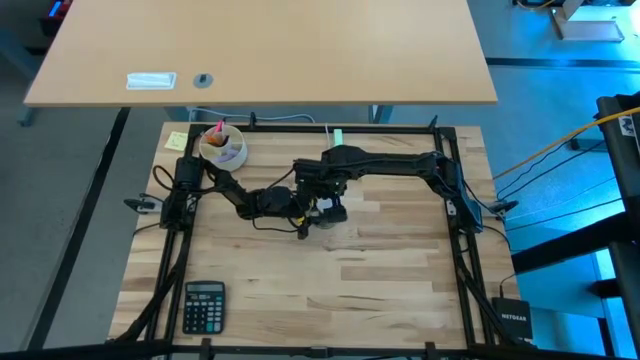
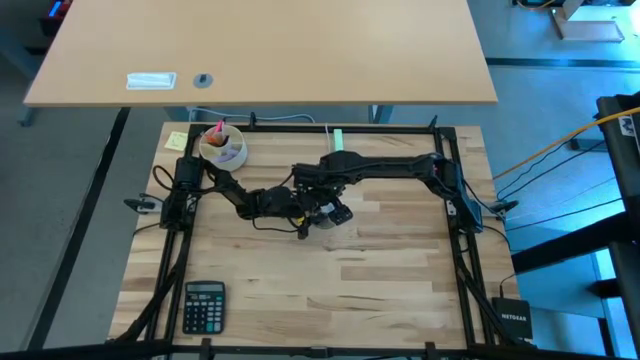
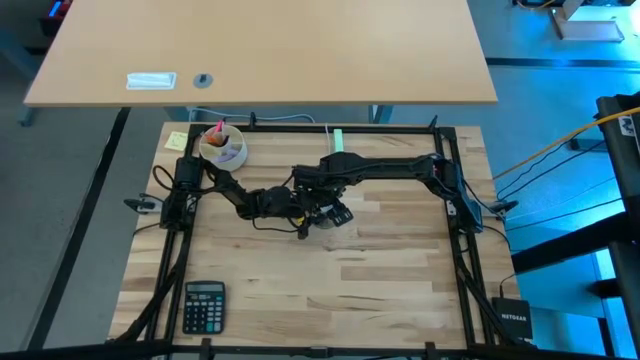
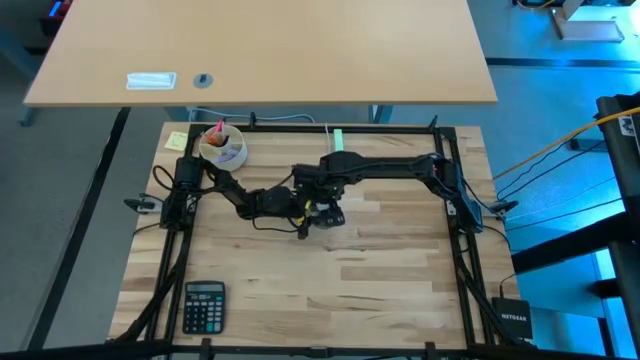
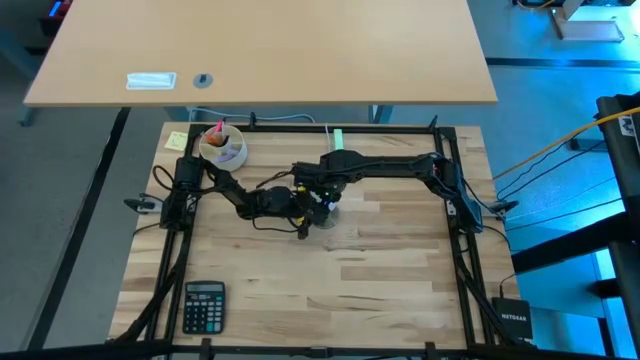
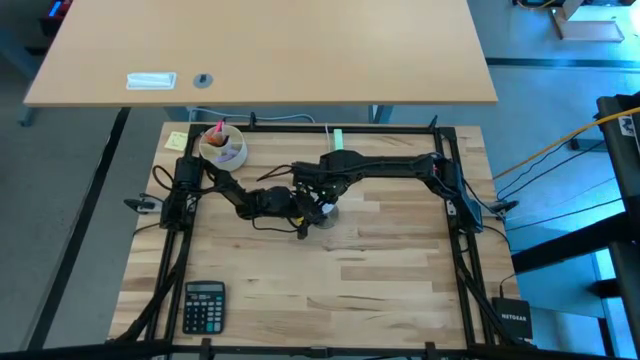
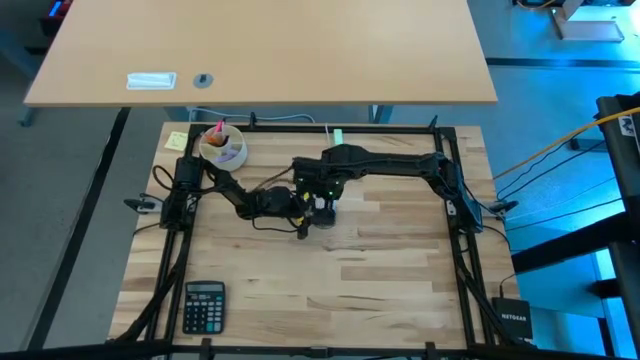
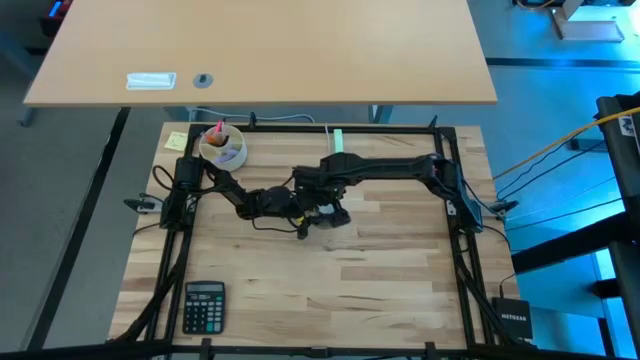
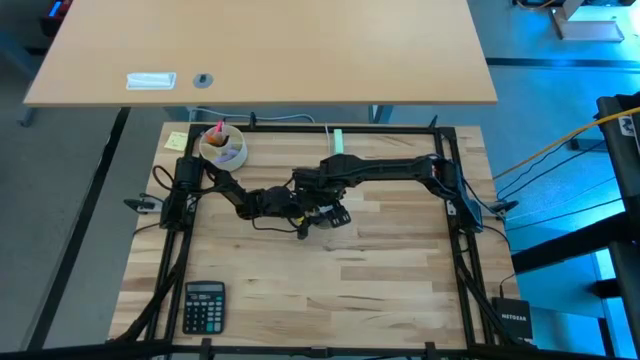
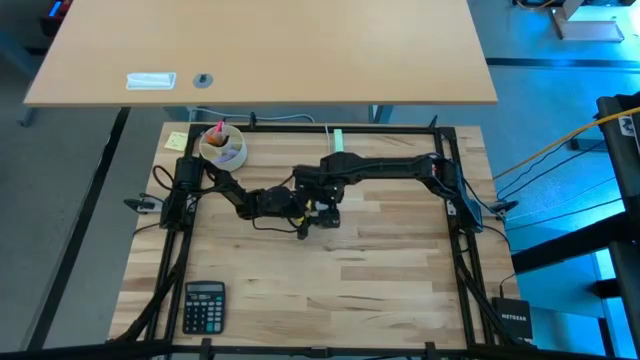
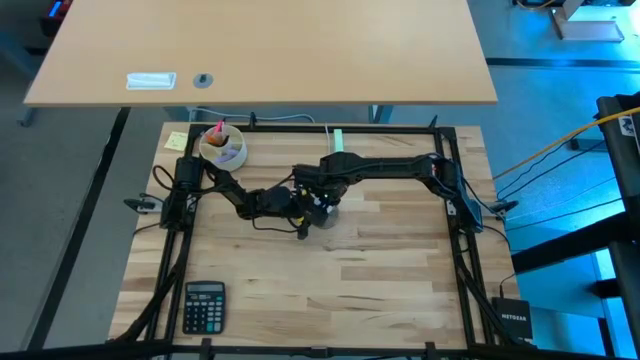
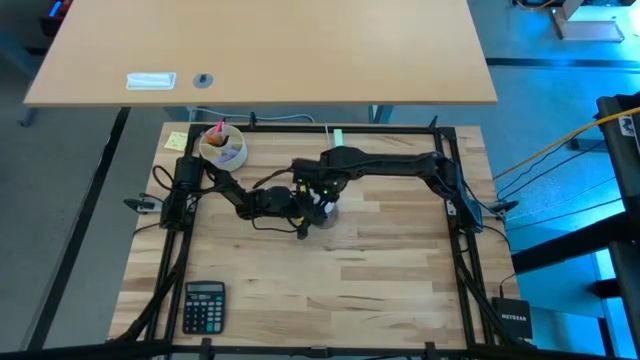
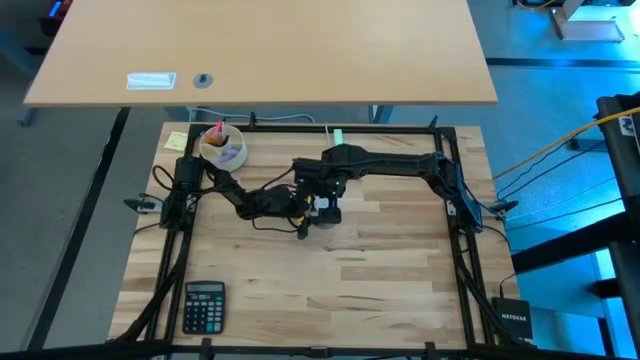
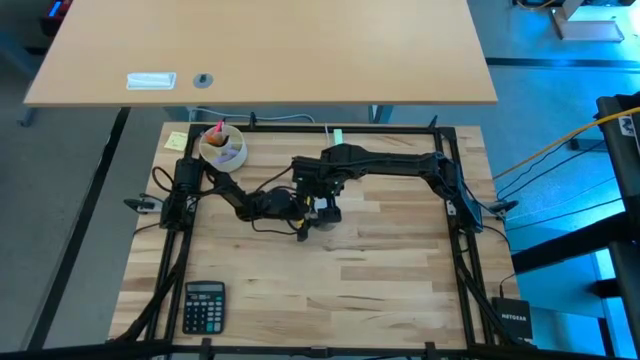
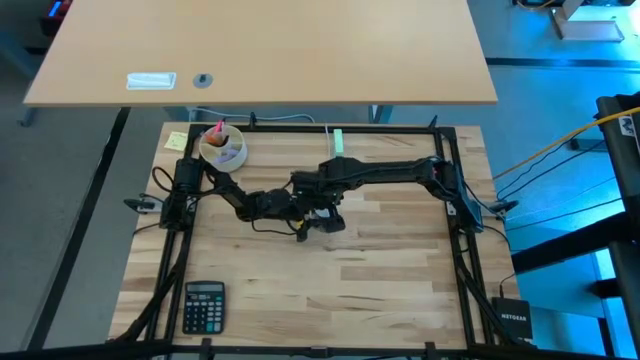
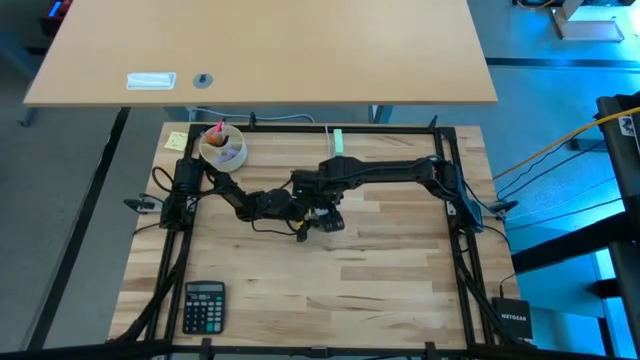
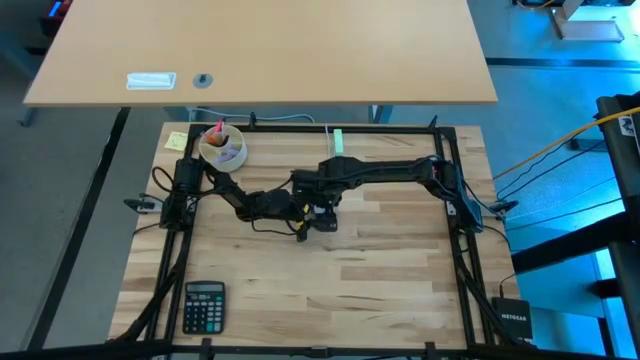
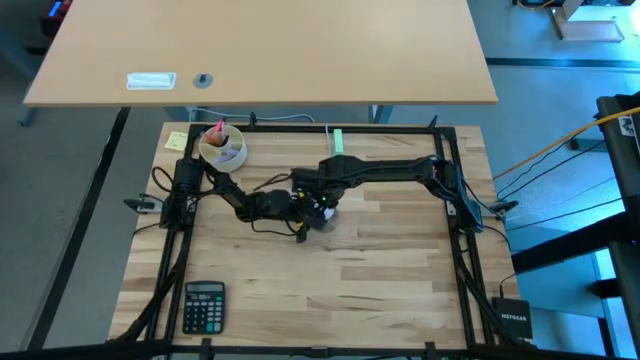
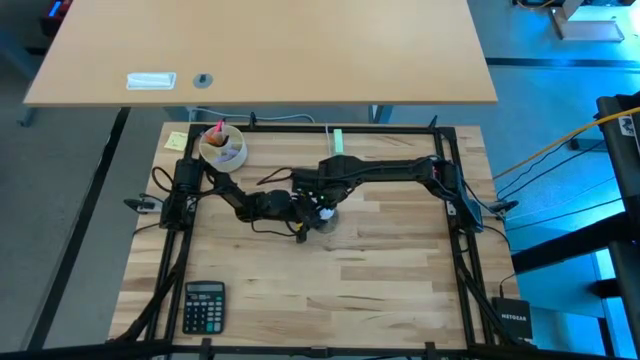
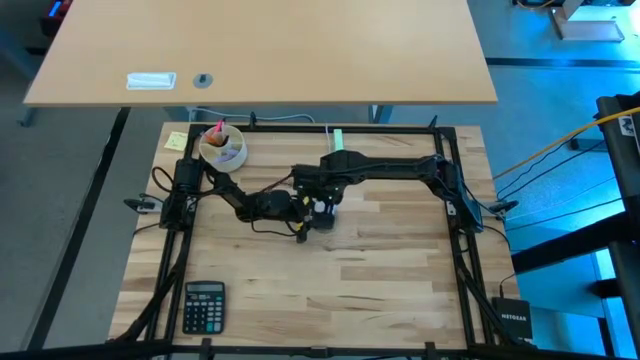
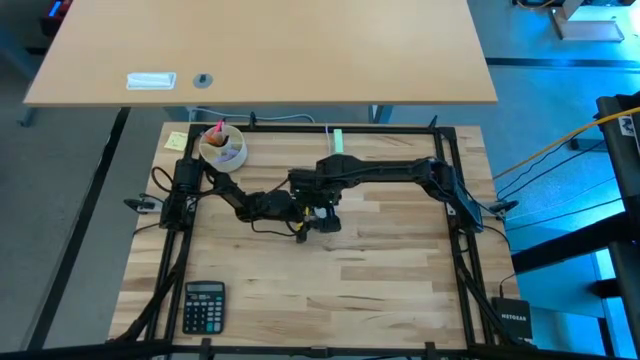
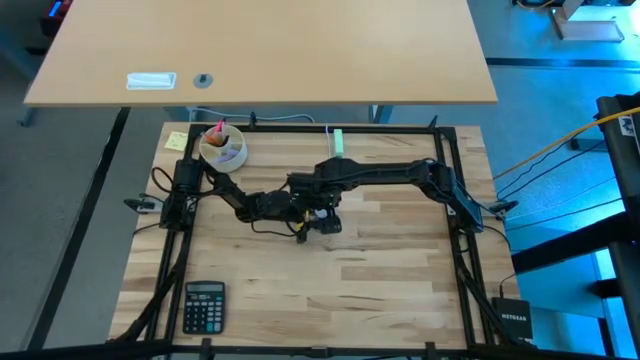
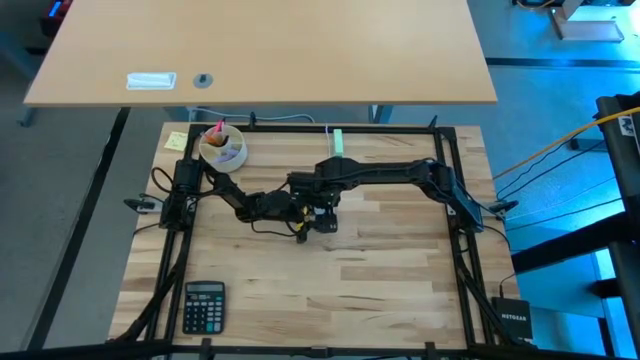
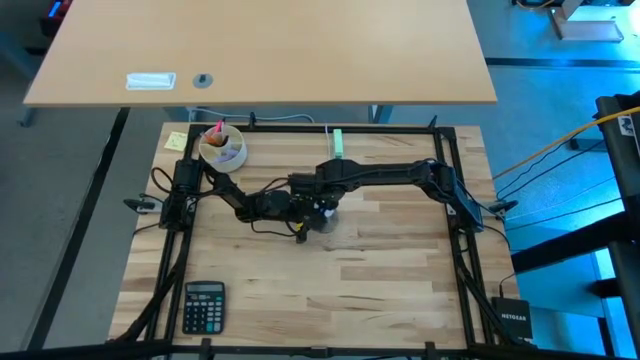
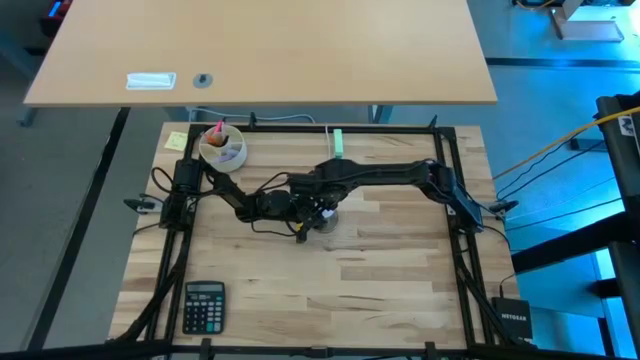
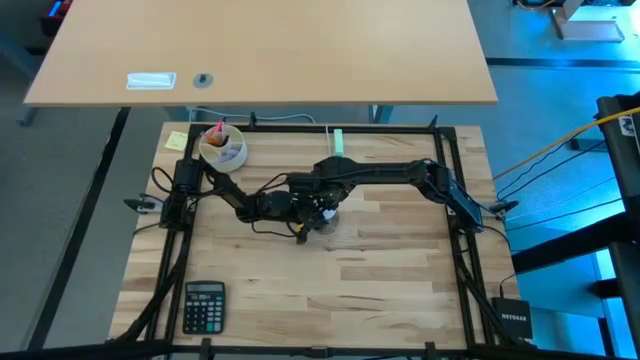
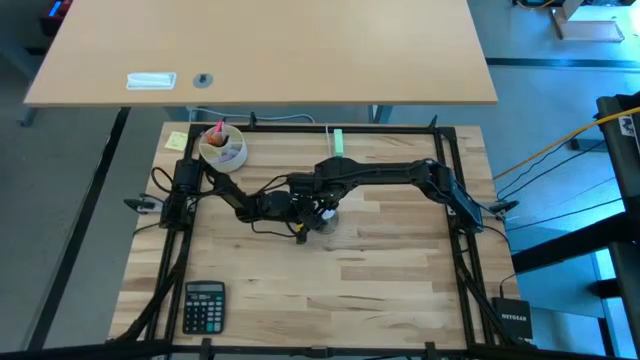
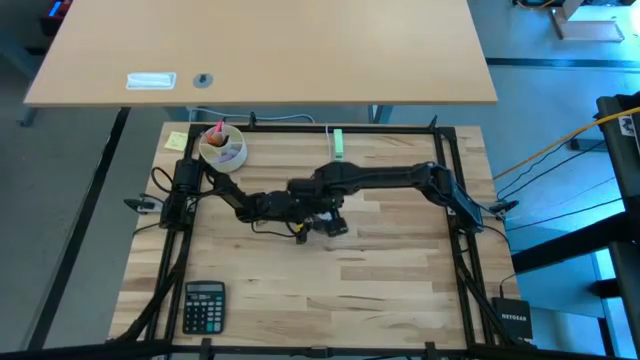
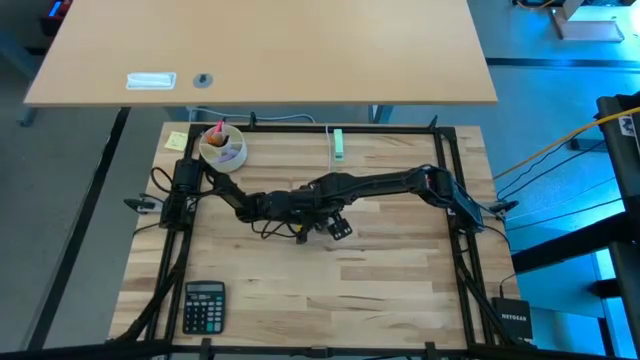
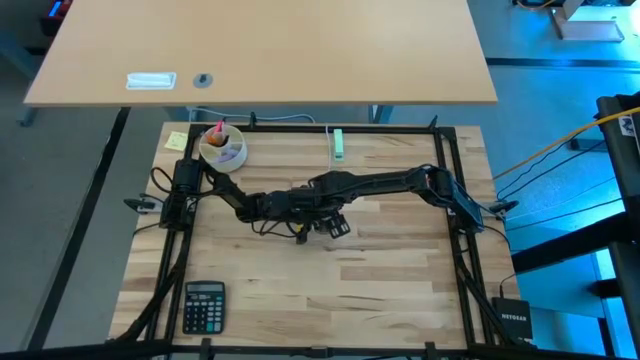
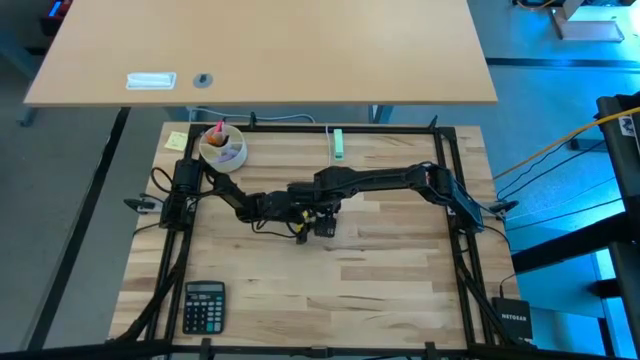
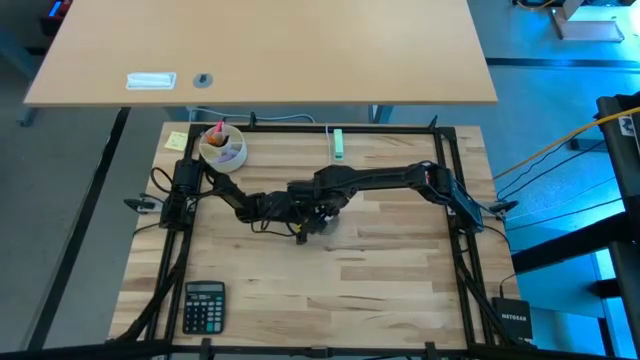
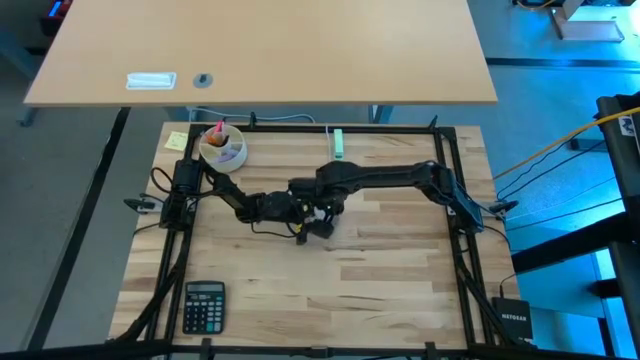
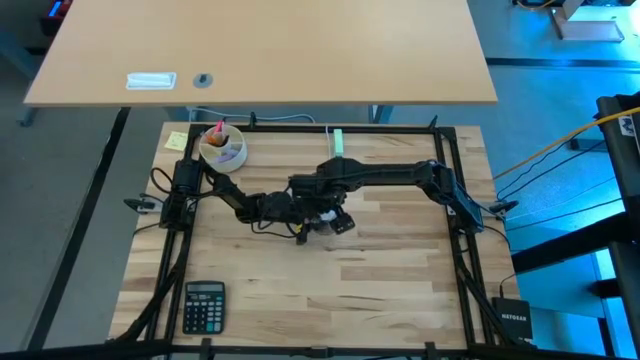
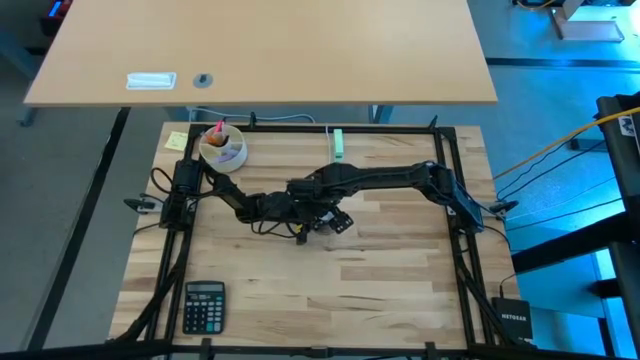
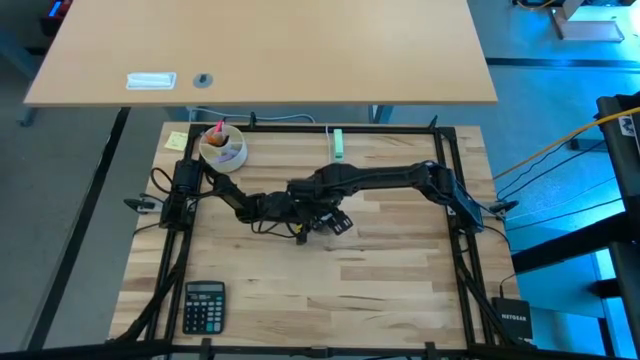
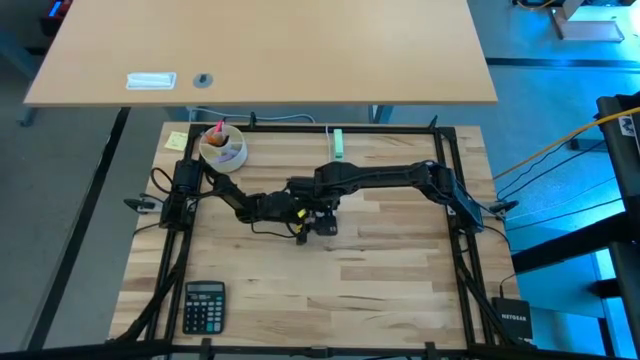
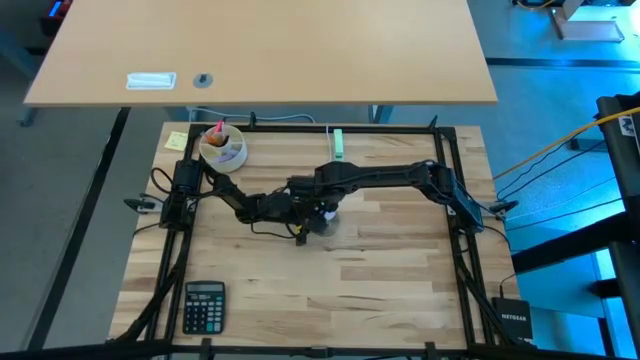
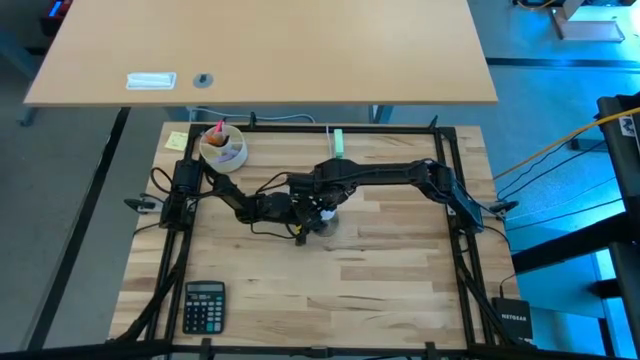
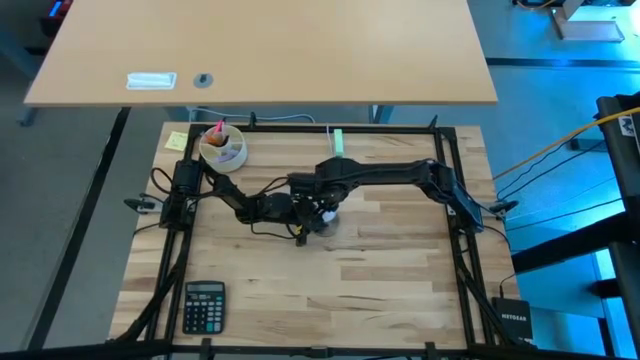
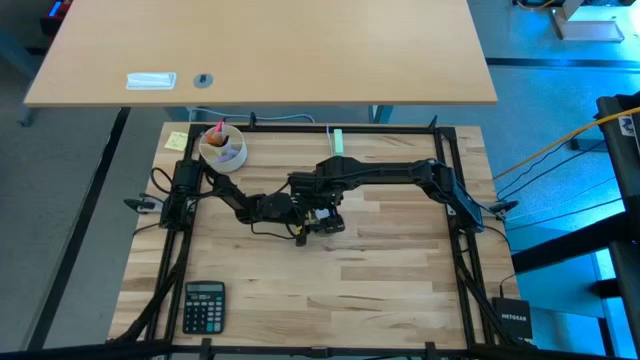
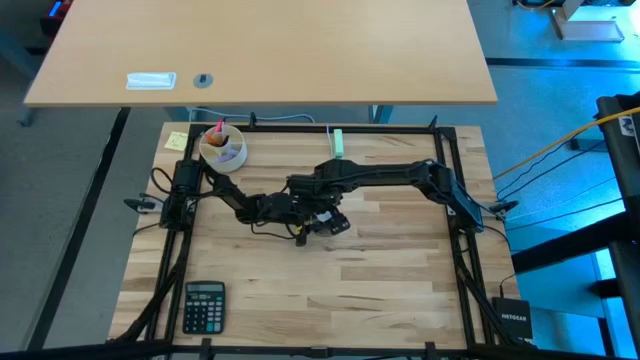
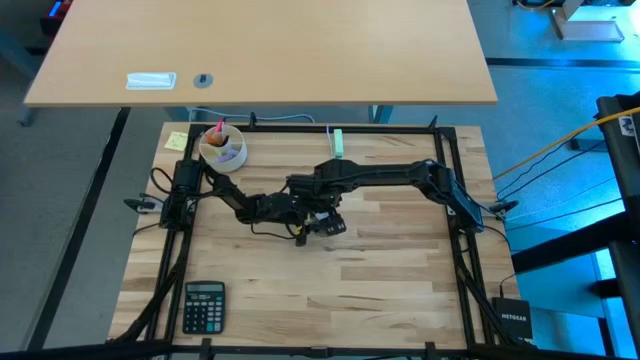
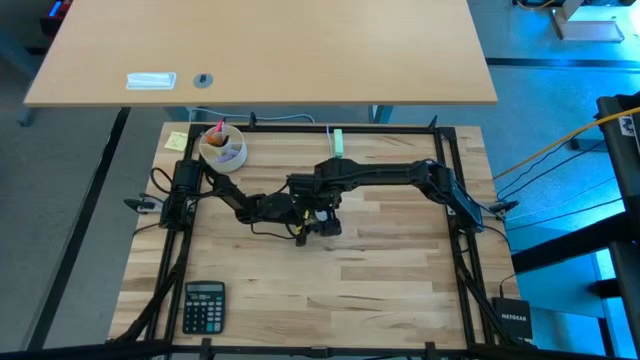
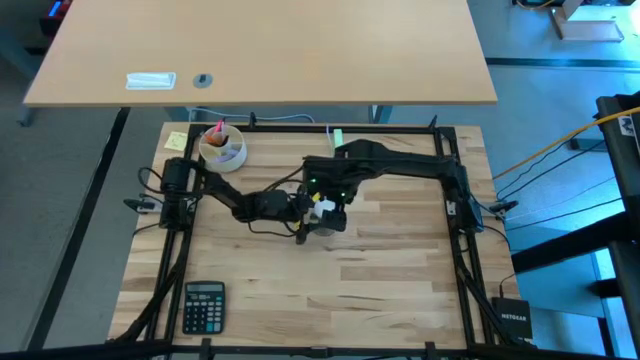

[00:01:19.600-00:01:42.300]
Task: Screw lightbulb
Insert the lightbulb into the lamp
